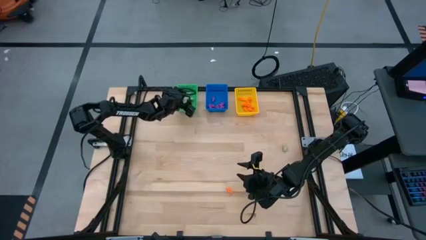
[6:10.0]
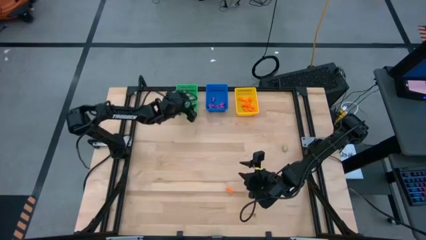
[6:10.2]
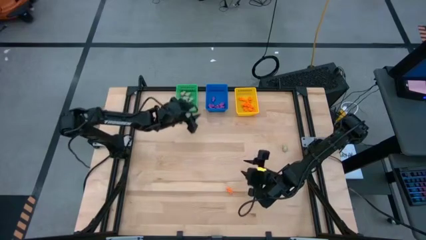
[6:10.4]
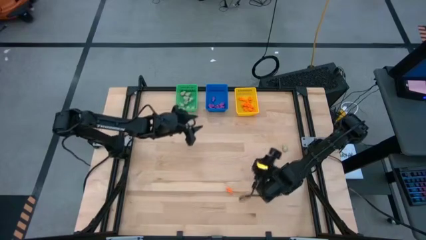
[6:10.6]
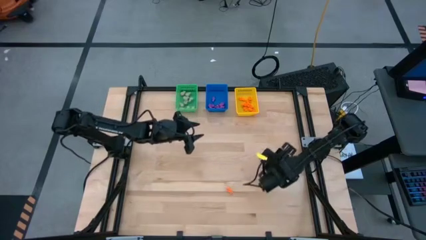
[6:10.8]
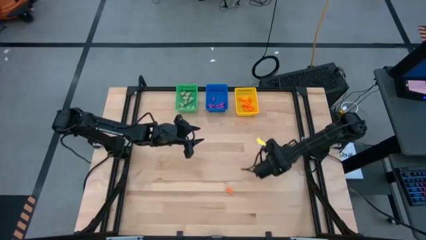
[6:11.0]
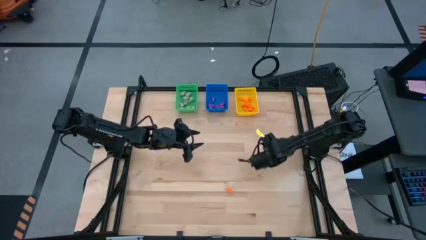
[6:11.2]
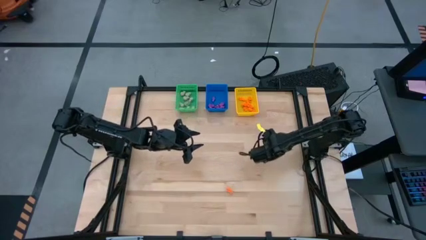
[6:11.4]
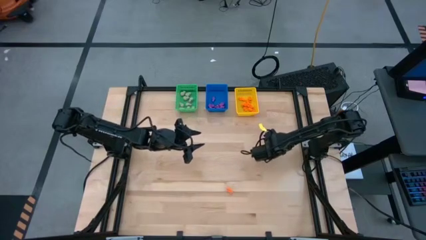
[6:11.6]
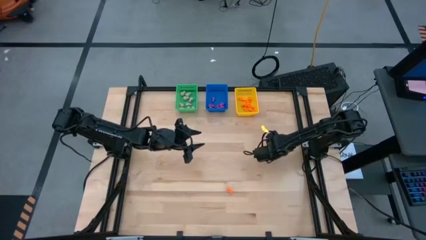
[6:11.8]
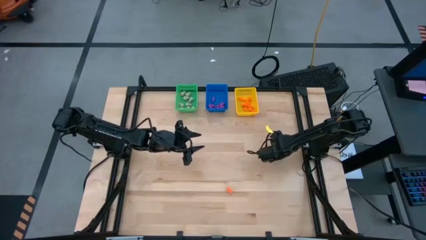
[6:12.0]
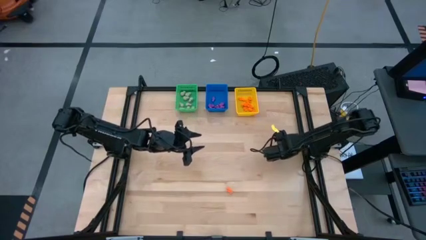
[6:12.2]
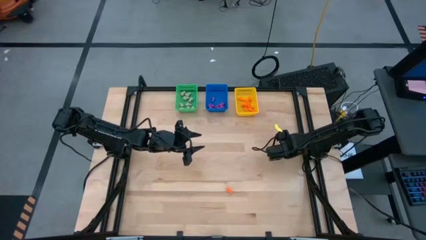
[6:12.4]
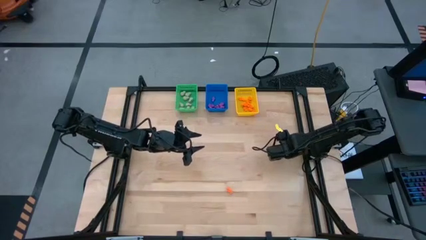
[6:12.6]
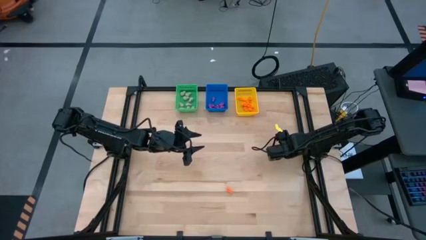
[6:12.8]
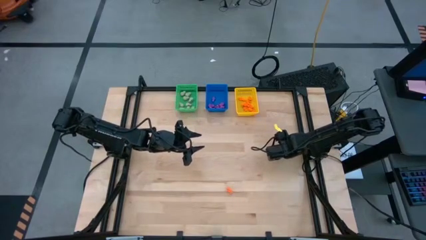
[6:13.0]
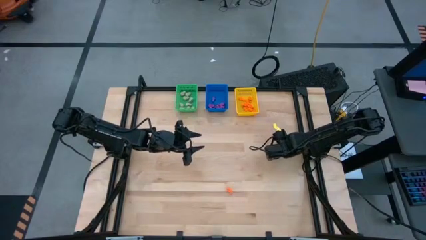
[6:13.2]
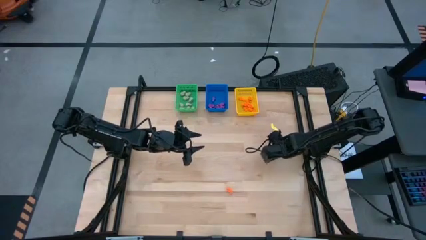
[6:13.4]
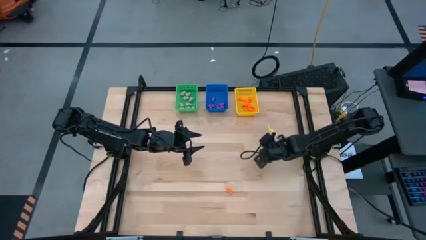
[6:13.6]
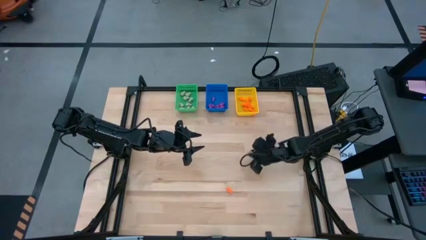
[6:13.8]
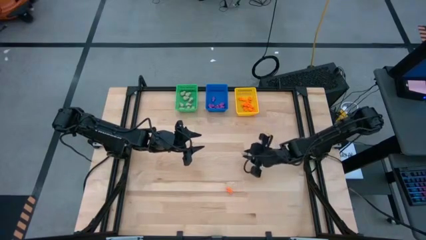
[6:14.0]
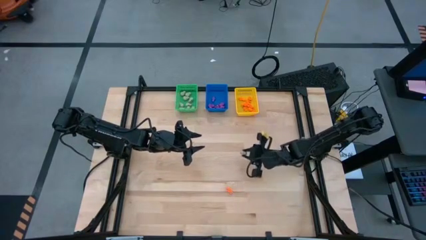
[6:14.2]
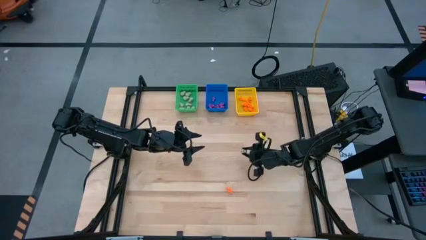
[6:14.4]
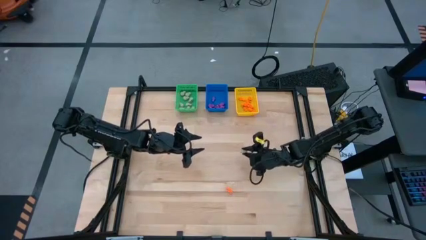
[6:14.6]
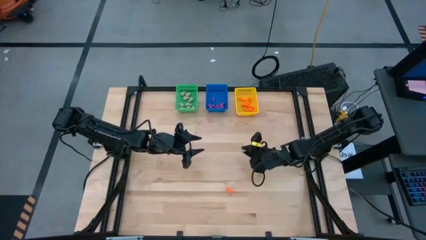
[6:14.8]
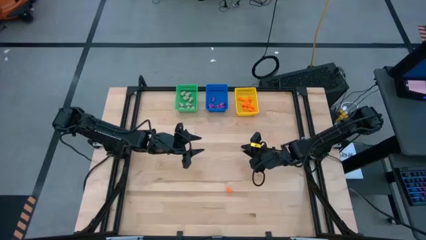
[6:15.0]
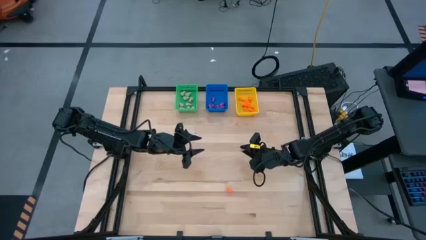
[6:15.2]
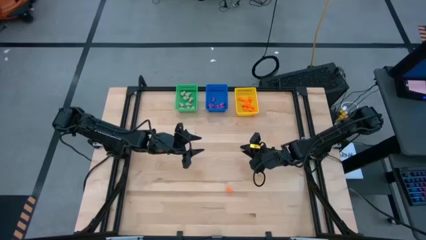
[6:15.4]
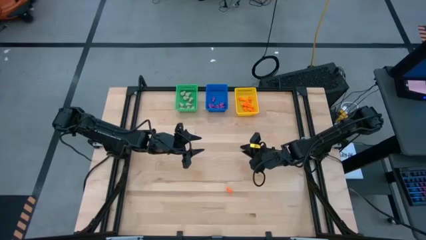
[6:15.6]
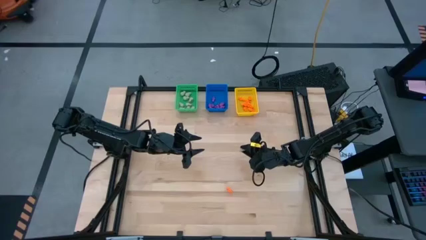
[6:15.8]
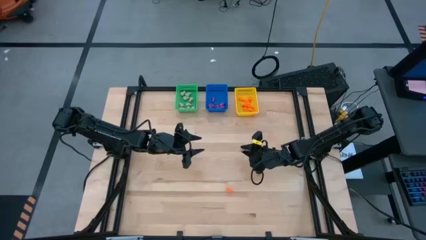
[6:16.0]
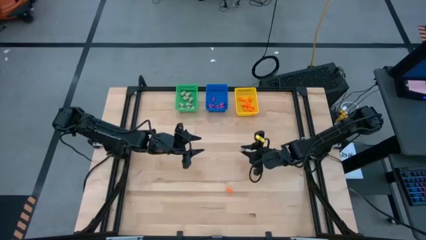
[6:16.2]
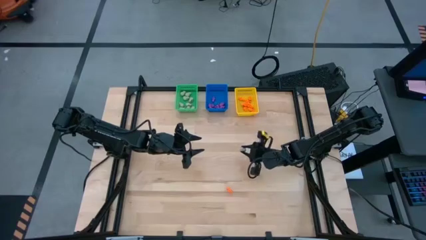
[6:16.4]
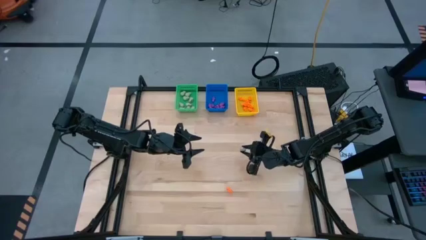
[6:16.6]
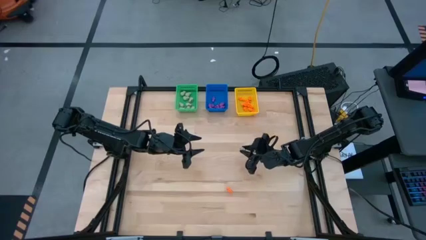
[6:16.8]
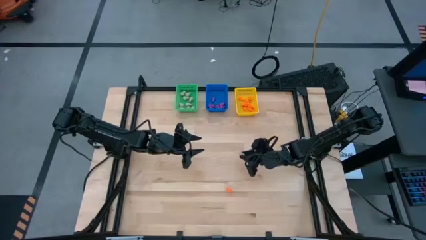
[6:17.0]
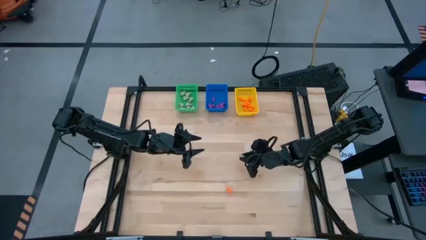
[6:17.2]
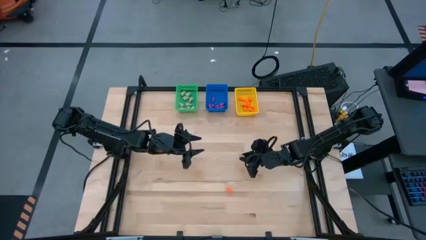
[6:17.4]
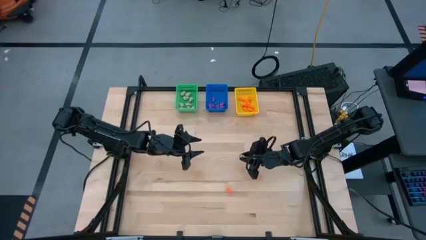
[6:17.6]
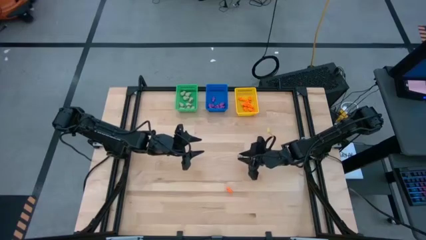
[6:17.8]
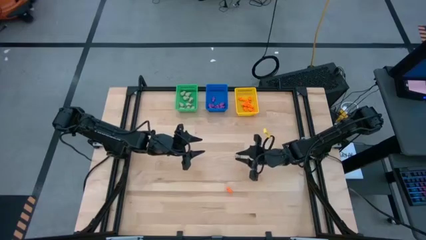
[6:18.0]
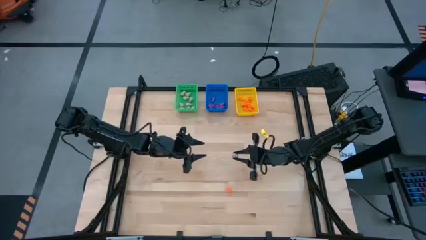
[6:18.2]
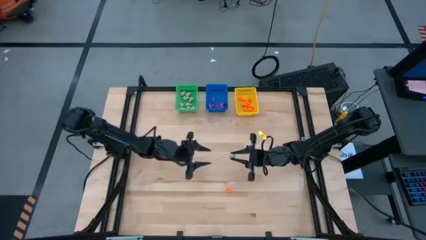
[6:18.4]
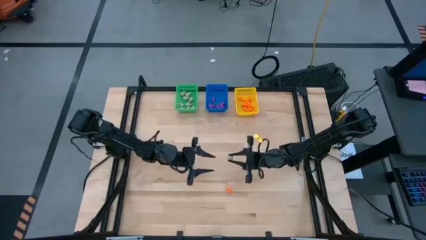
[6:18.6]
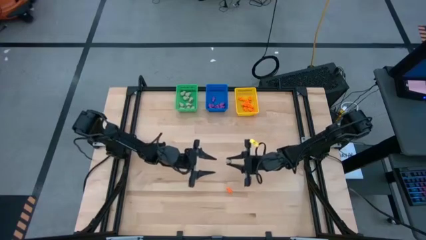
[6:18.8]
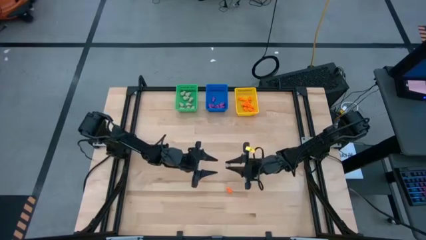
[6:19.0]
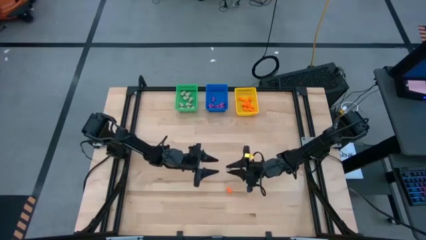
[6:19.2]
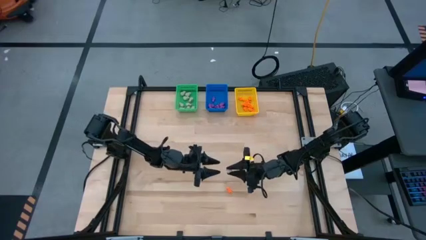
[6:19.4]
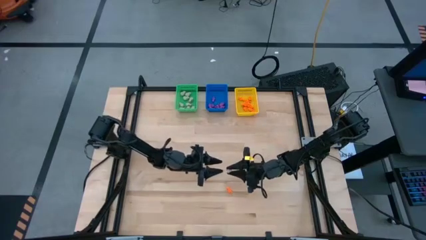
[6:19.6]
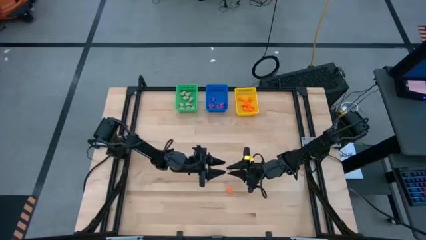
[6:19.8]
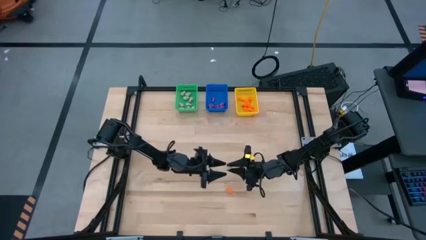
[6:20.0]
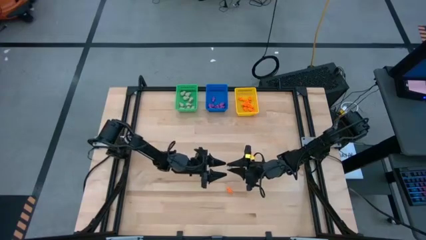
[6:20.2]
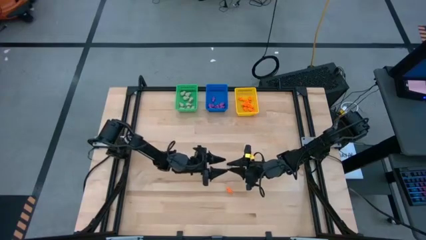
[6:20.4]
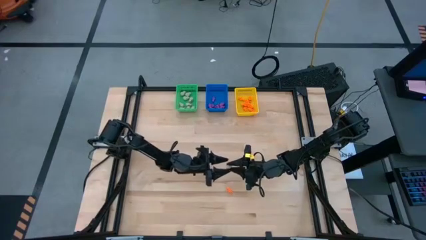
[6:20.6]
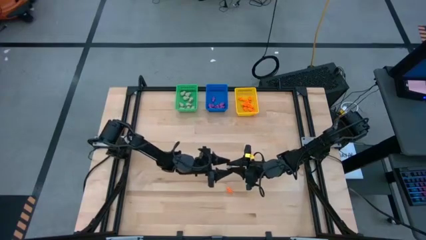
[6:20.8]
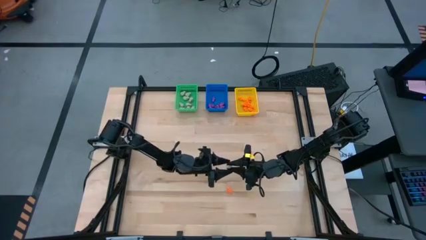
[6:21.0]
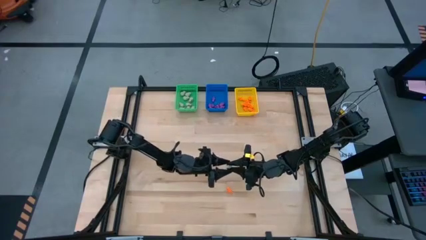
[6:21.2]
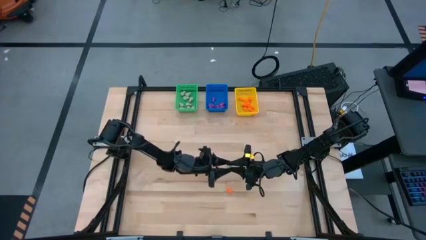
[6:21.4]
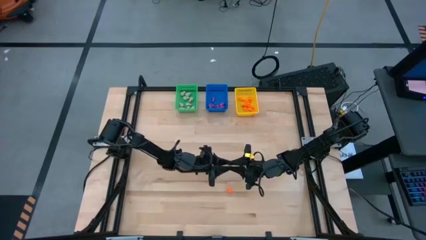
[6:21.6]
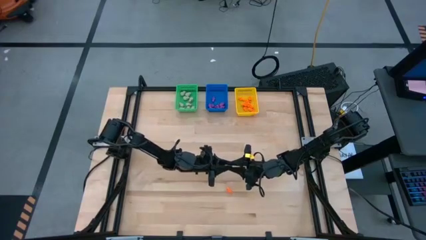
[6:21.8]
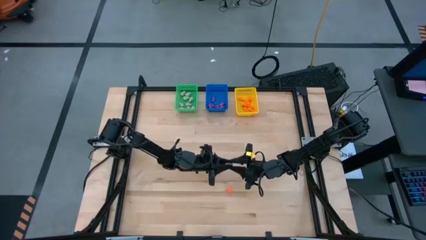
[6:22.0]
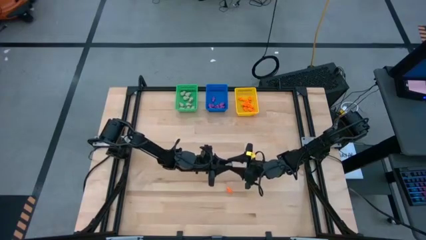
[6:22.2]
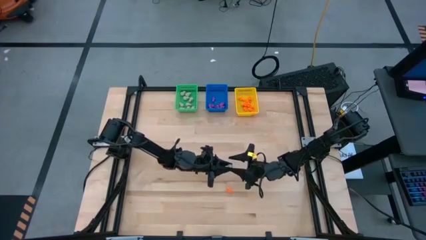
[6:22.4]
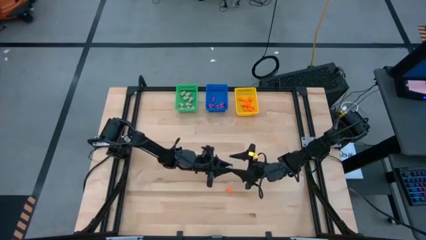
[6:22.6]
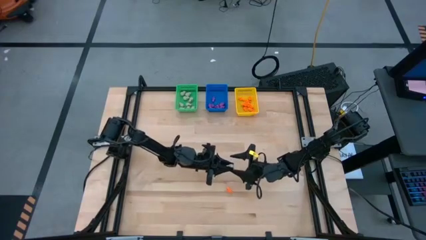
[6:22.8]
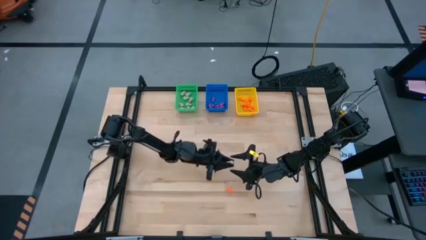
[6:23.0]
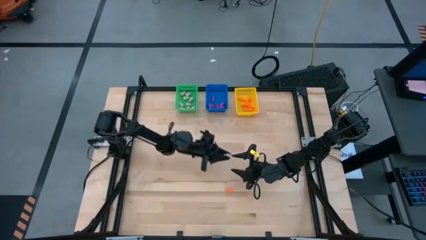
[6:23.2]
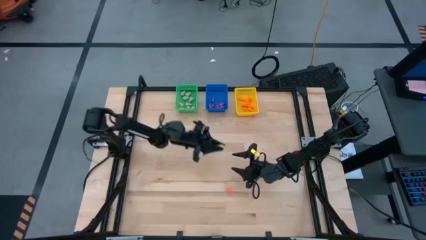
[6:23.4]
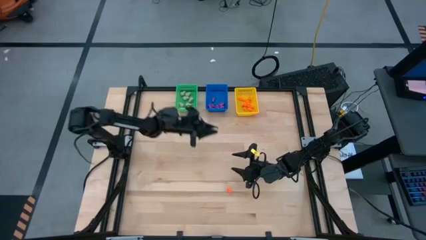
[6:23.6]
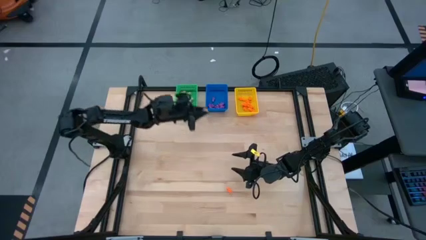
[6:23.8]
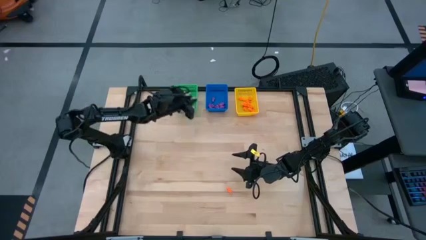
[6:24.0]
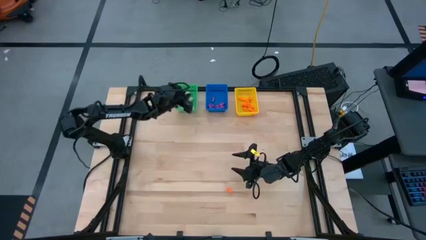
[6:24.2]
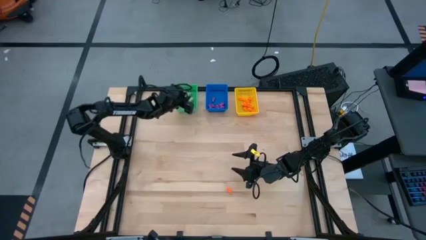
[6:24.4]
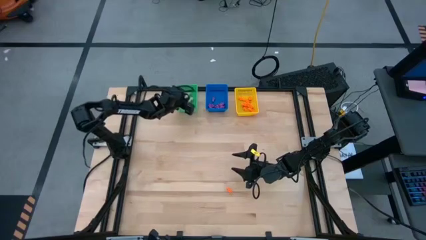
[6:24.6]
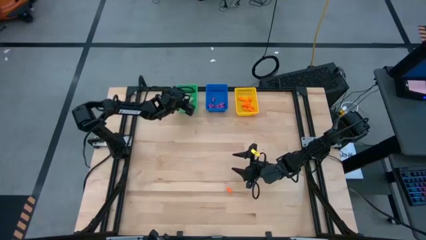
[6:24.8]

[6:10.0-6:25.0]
Task: Sort Halloween decoration
Put the gray skull toy into the green bin

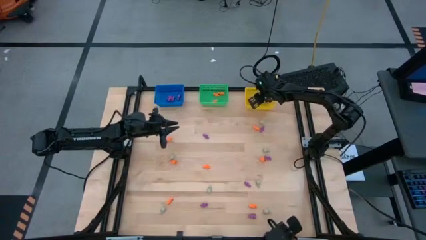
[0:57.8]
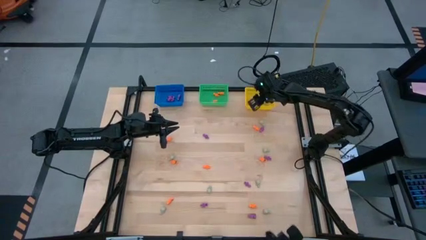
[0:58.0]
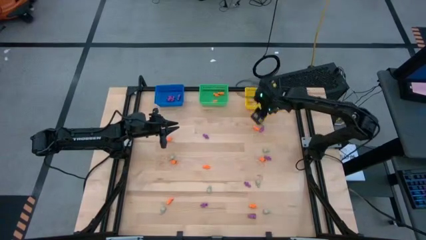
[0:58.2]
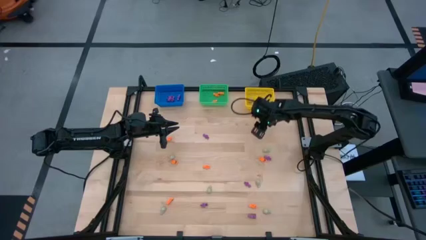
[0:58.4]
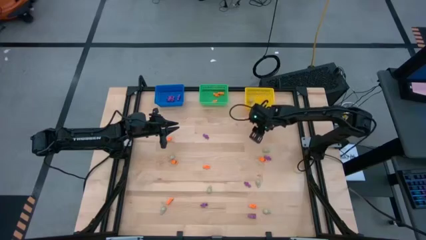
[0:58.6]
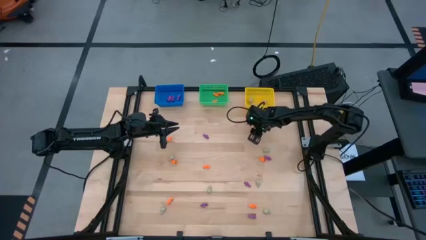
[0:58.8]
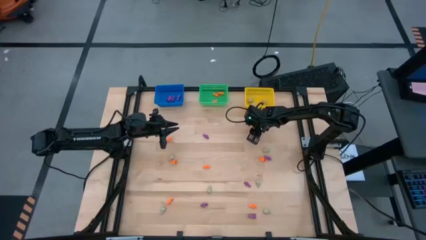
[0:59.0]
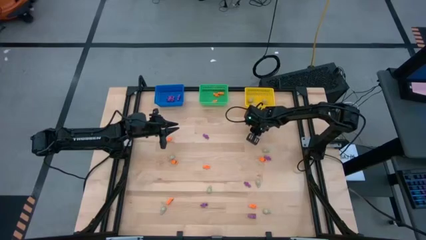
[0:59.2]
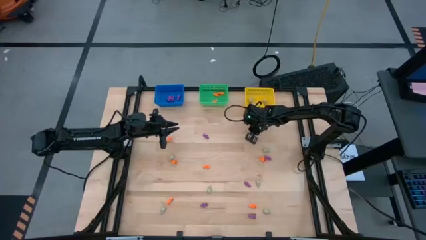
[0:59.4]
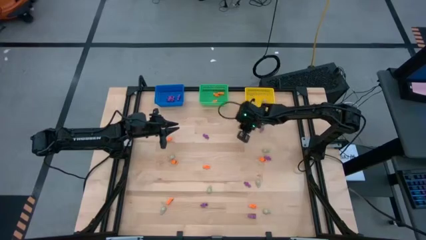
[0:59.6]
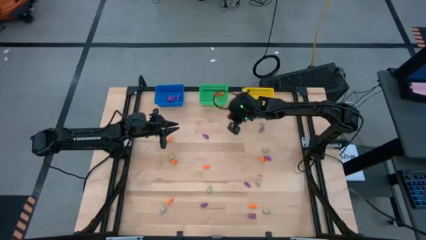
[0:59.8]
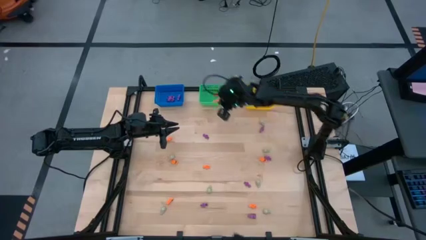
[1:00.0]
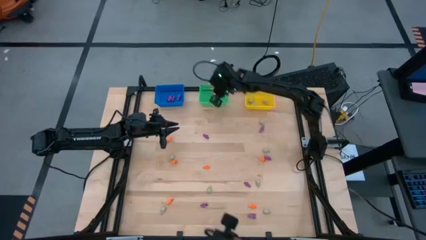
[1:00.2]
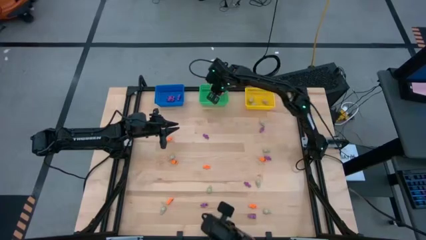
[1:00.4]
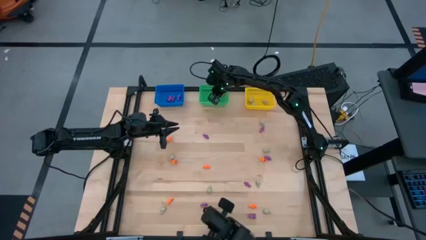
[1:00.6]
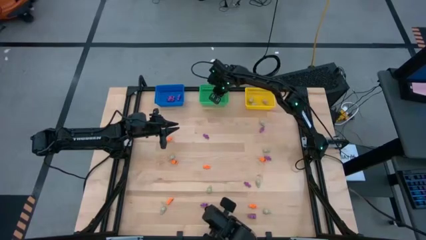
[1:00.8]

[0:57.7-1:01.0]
Task: Sort Halloween decoration
Put the orange skeleton toy into the green basket
